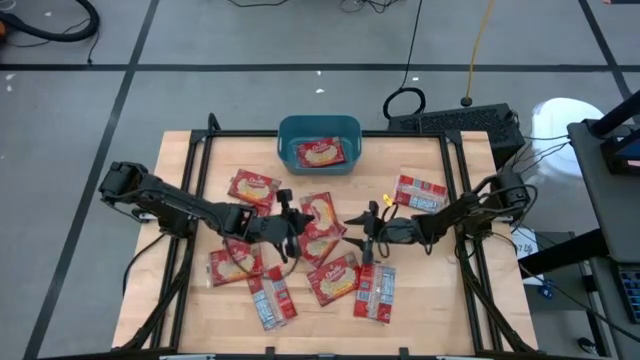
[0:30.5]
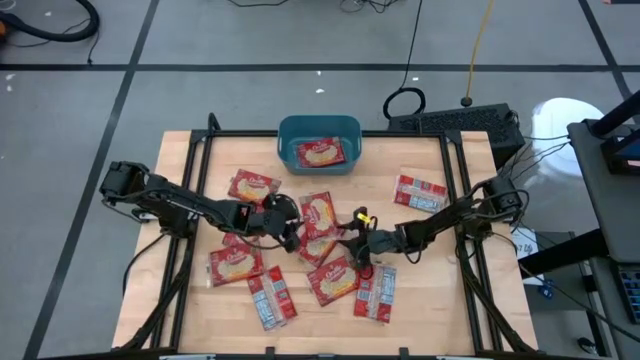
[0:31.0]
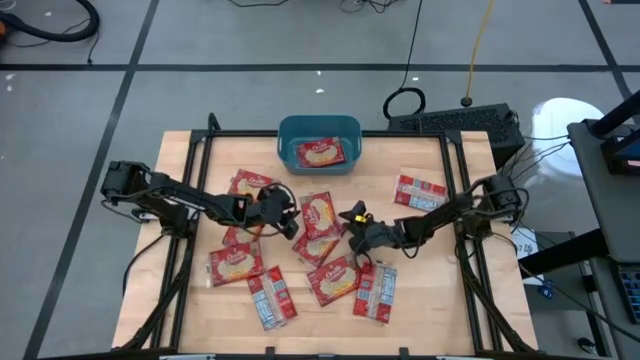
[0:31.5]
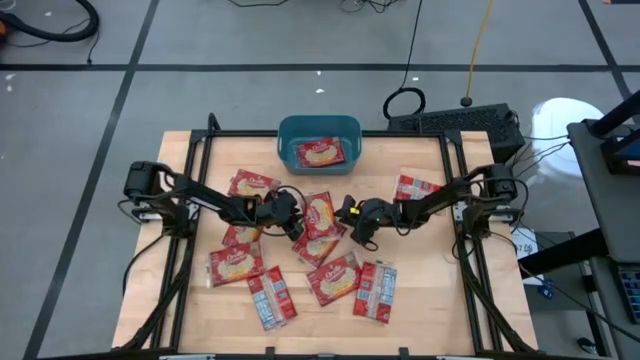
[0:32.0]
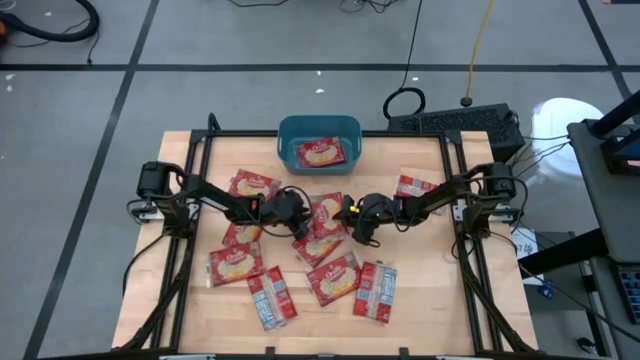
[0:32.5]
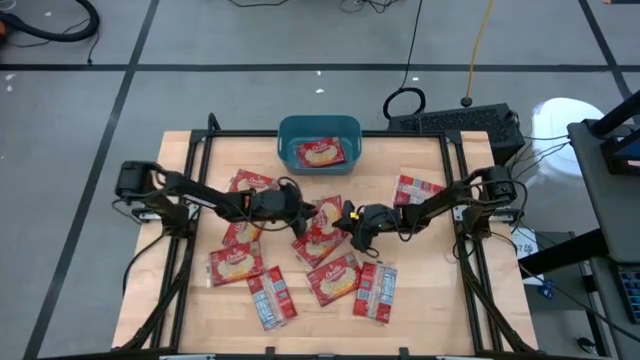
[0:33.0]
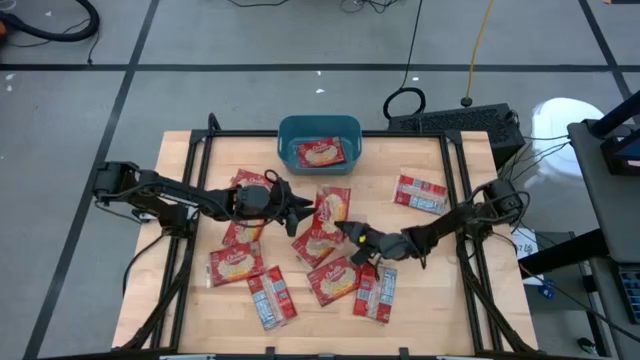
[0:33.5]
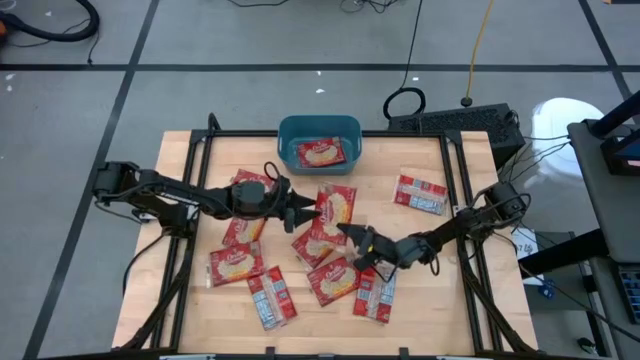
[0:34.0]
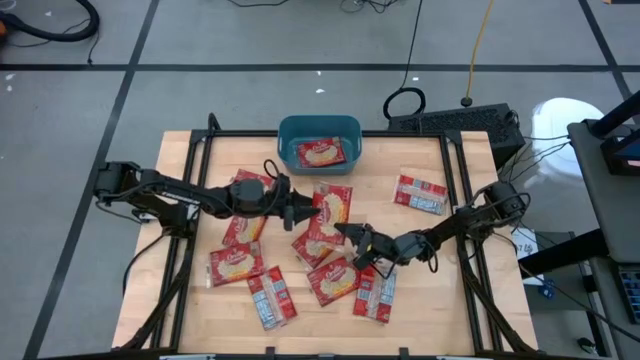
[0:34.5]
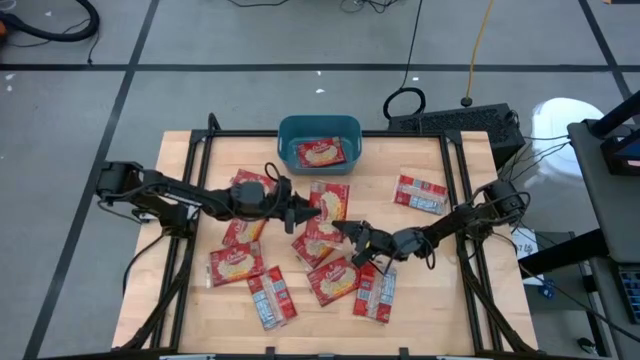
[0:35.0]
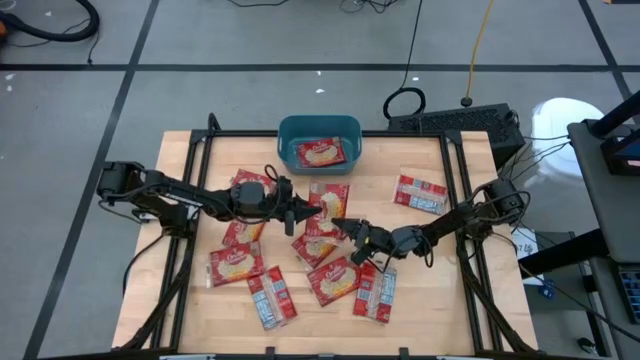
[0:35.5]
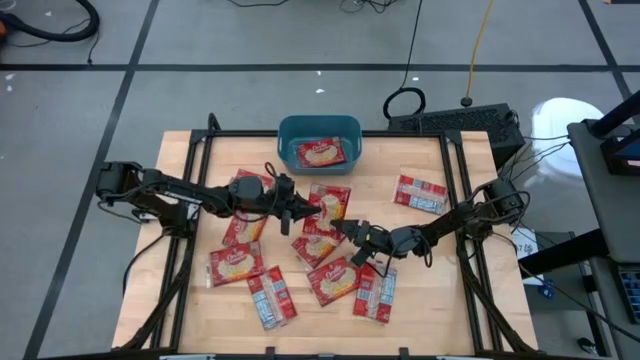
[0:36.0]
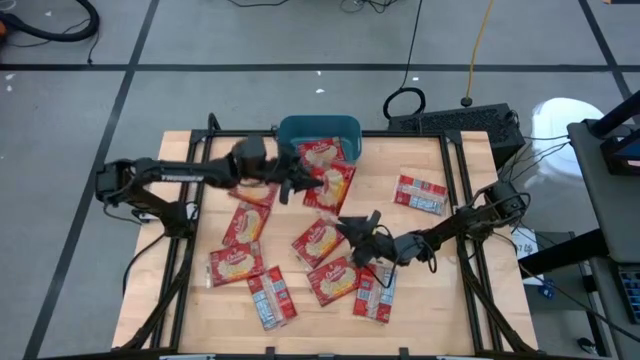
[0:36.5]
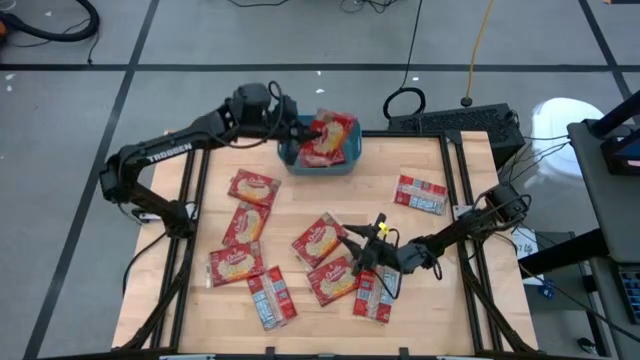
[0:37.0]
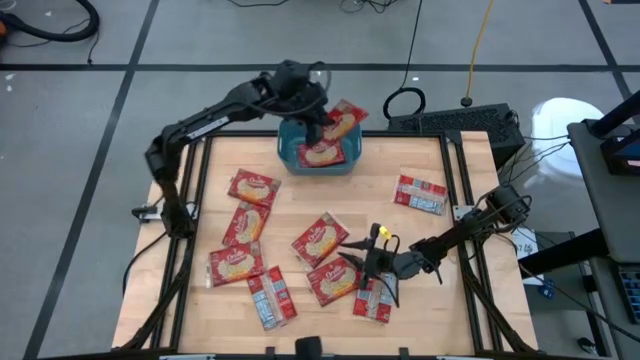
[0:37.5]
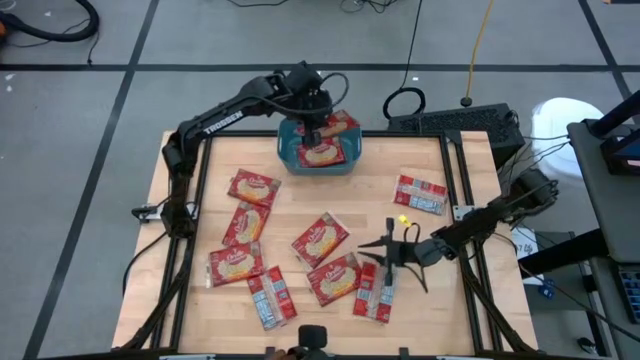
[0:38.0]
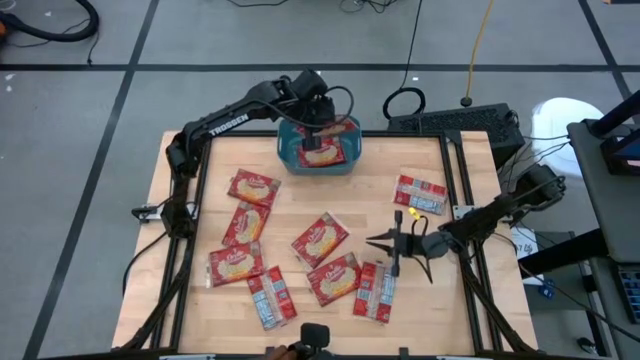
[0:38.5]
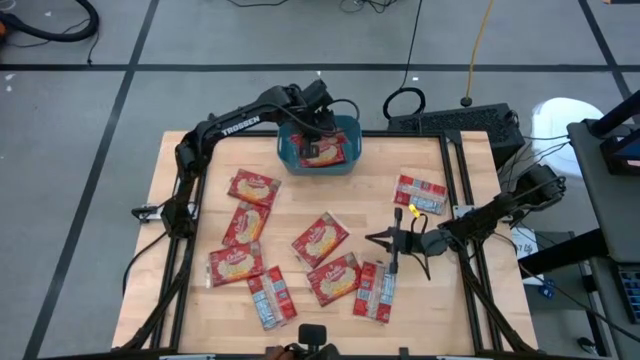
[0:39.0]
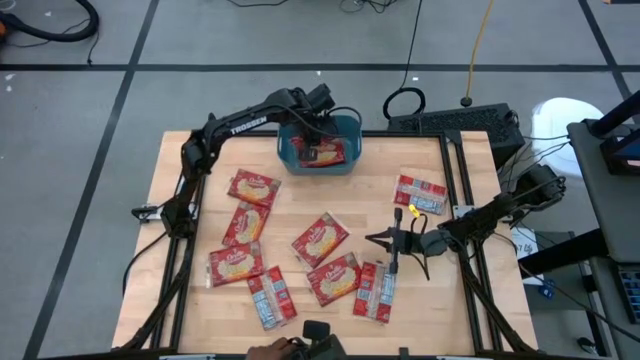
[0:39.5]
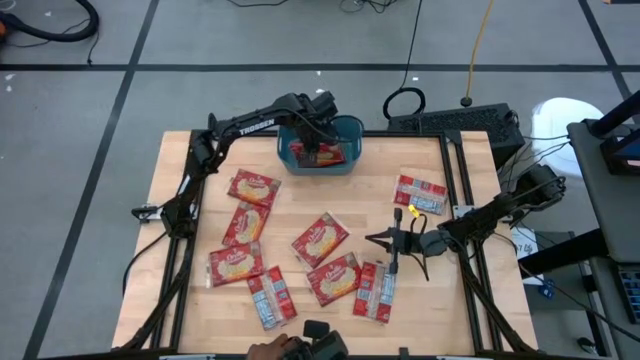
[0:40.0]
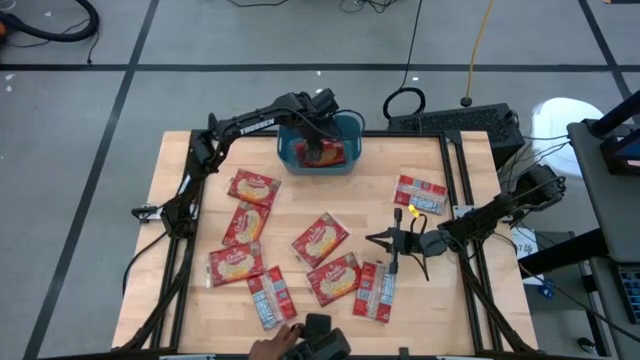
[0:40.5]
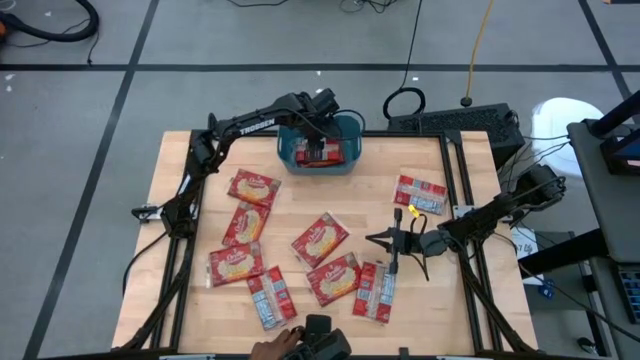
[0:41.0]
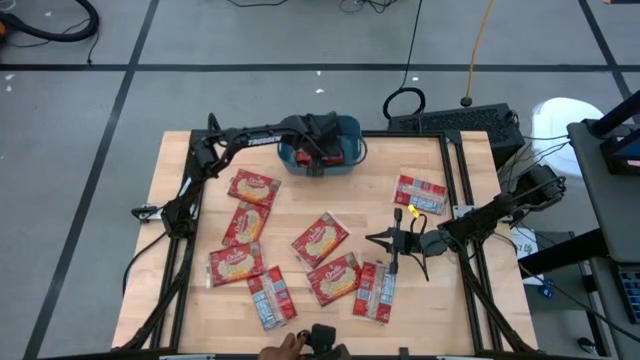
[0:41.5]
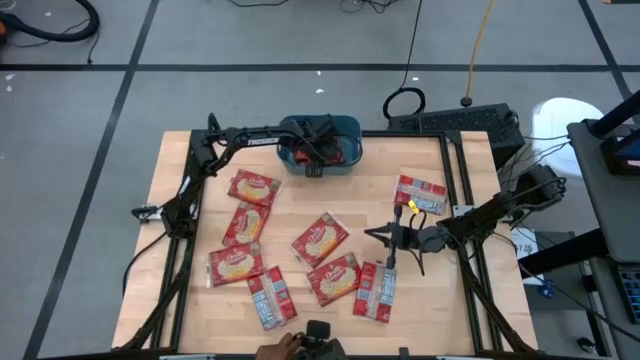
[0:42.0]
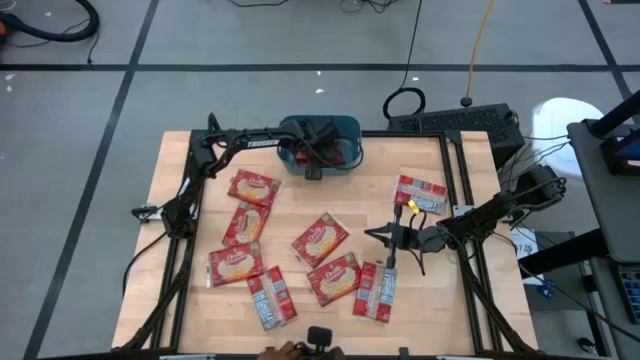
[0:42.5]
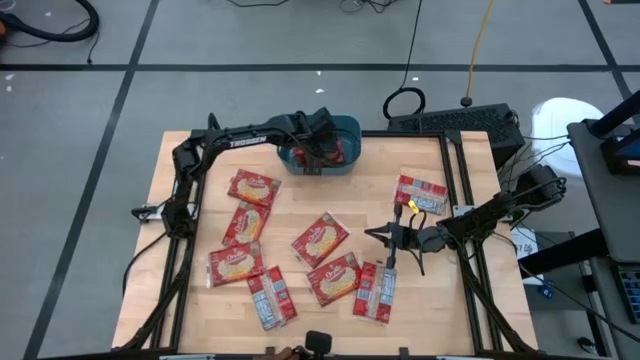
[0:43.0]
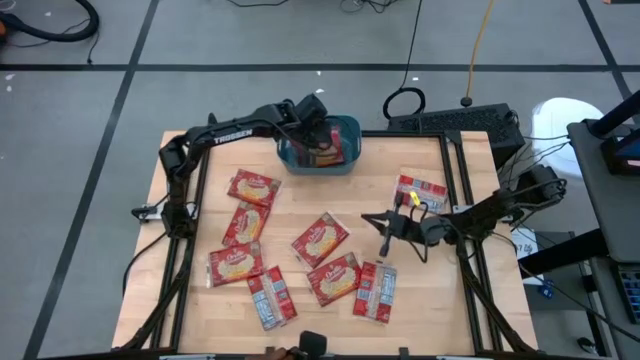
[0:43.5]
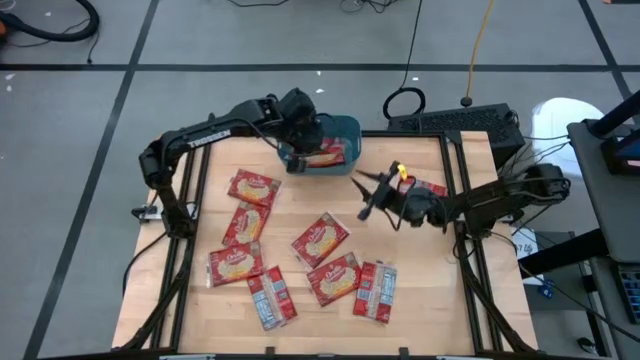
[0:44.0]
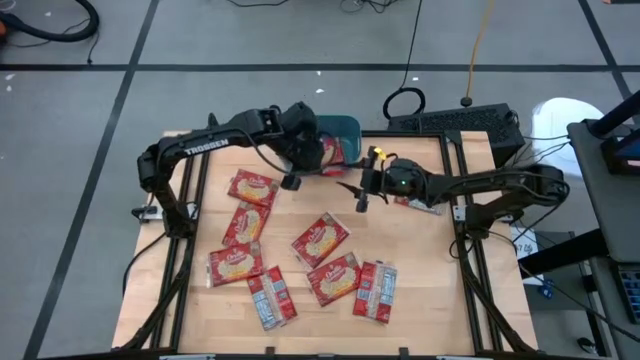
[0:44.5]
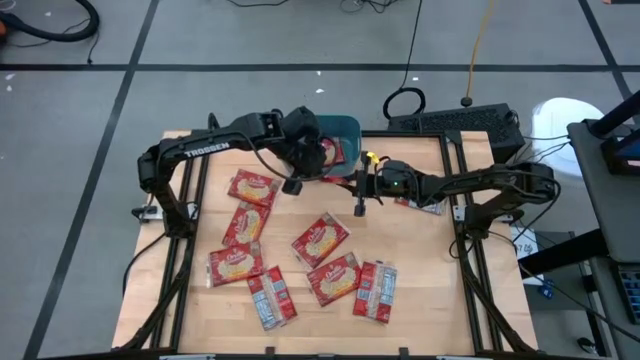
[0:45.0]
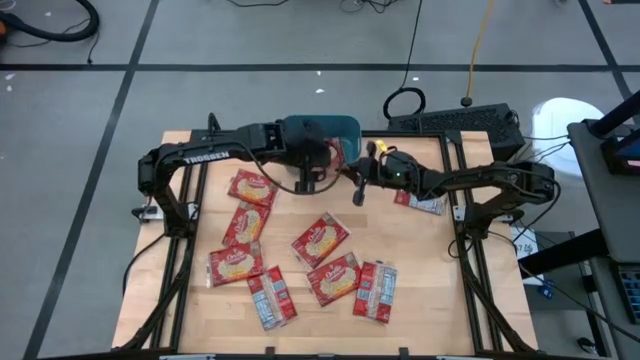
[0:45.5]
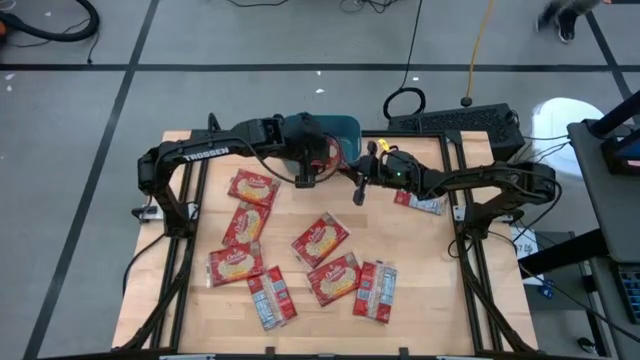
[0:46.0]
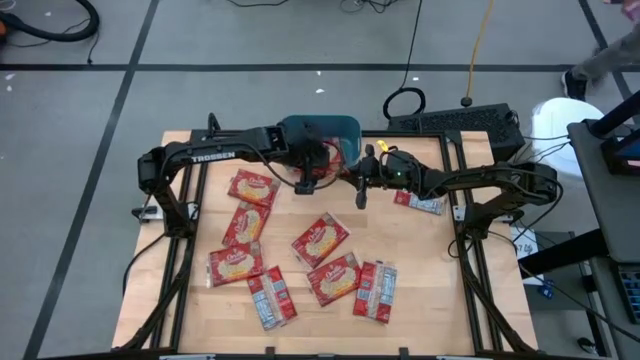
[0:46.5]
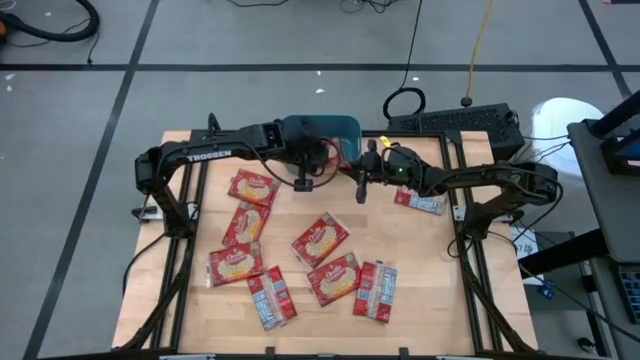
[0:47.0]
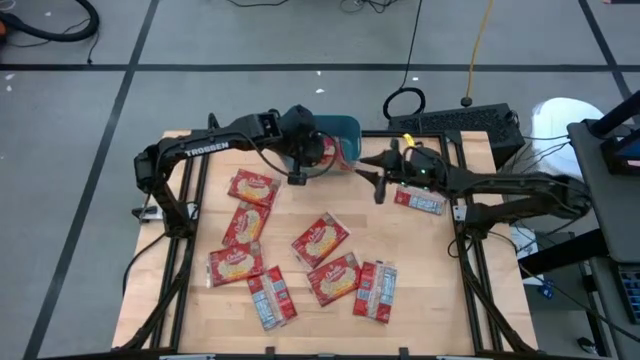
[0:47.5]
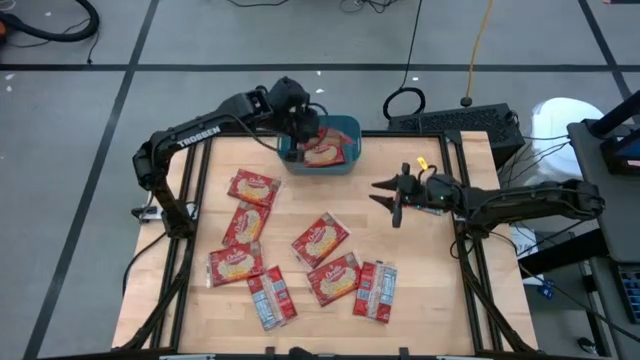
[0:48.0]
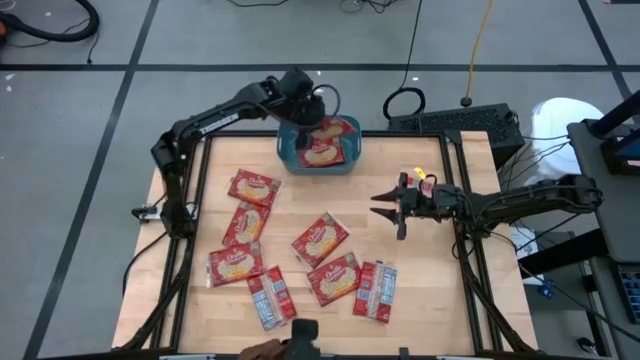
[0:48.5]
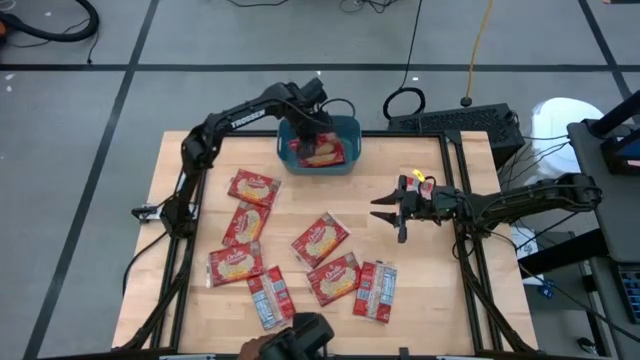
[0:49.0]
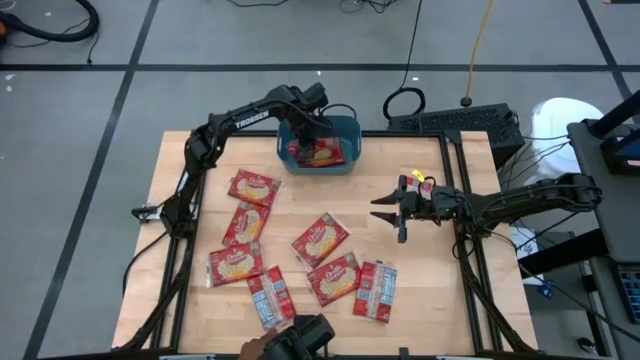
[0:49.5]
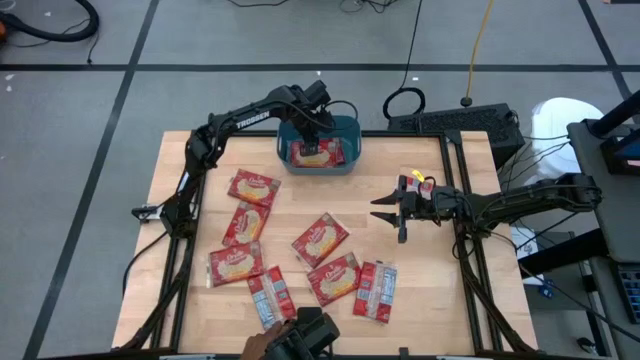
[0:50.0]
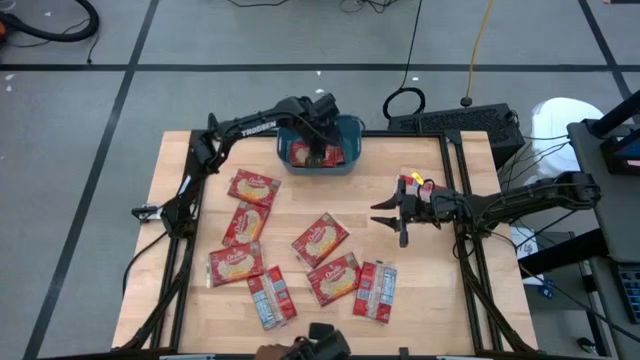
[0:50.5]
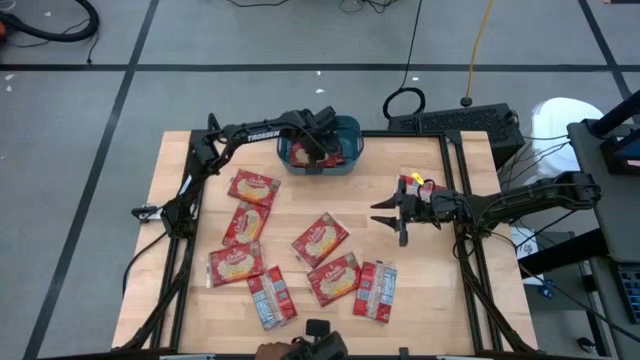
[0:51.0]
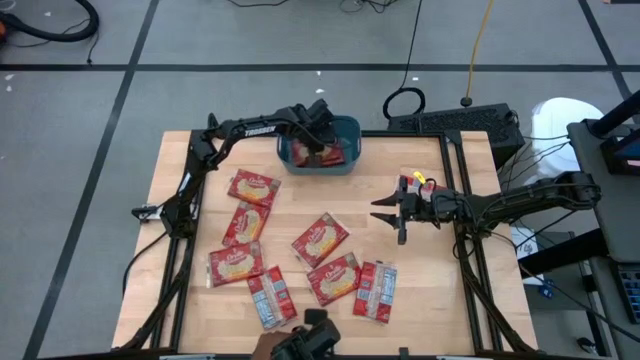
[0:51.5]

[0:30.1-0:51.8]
Task: Sort popcorn bags into baskets
Put the red popcorn bag into the blue bin
